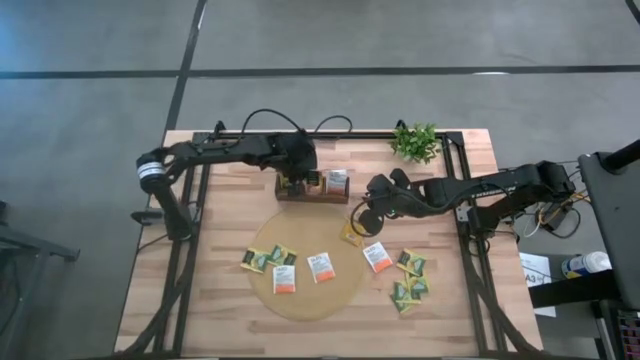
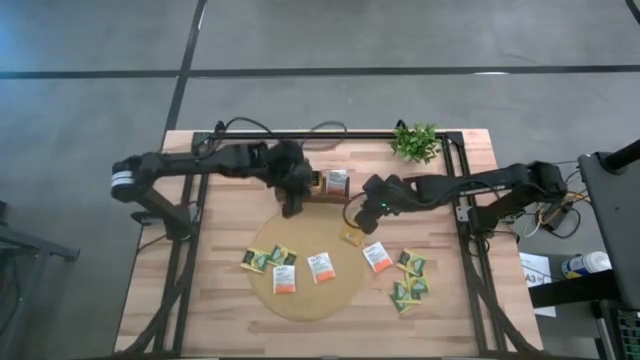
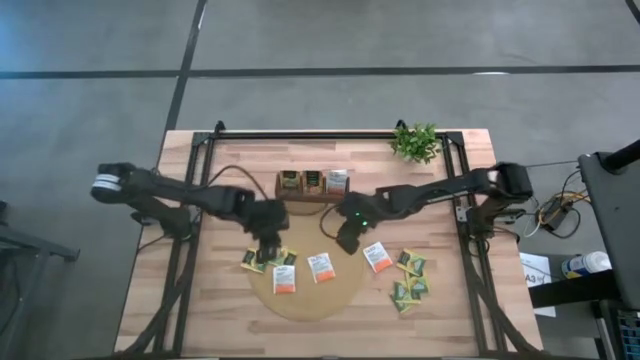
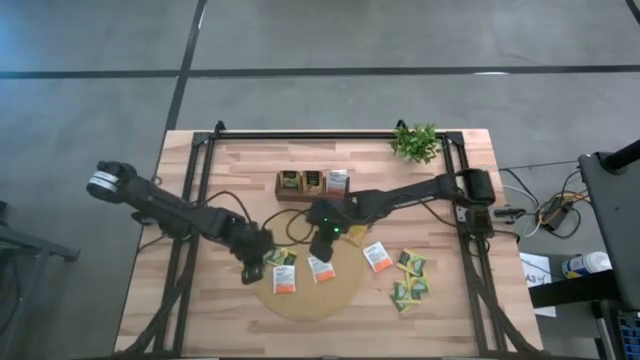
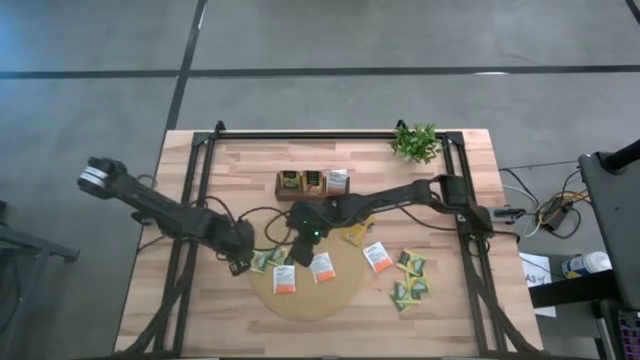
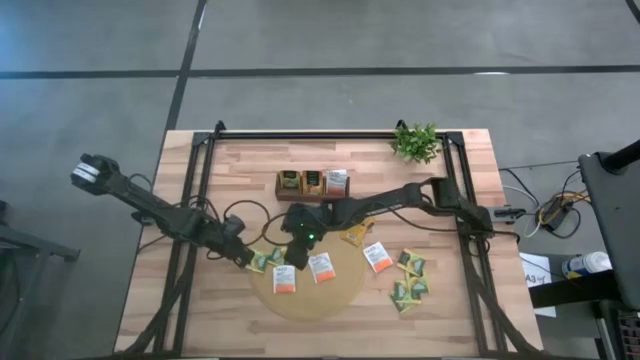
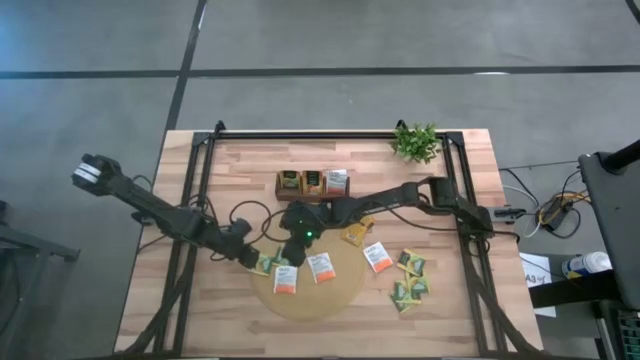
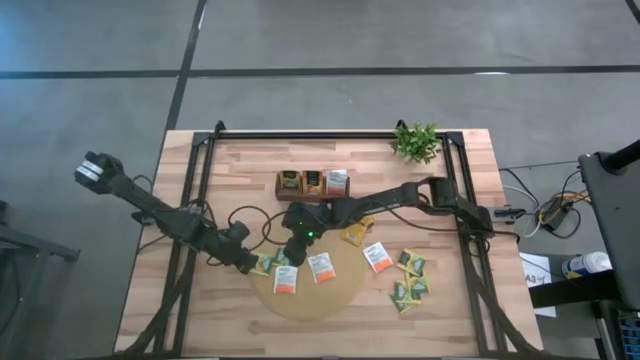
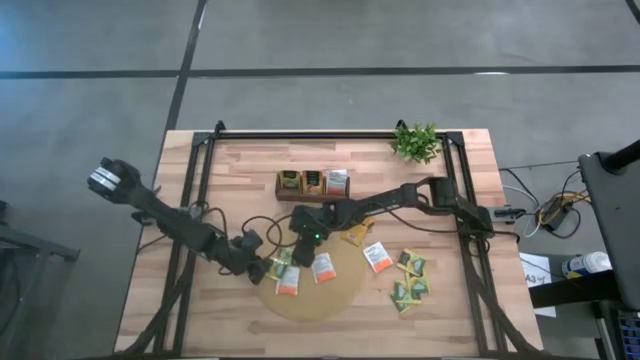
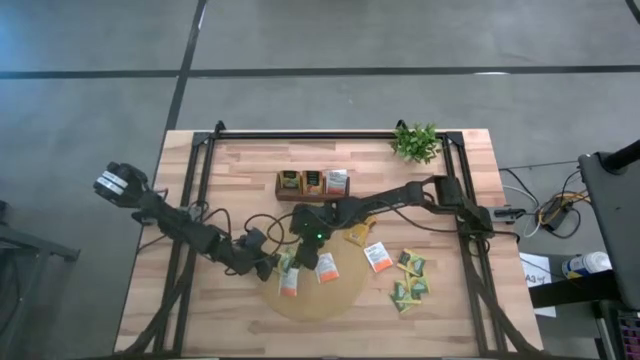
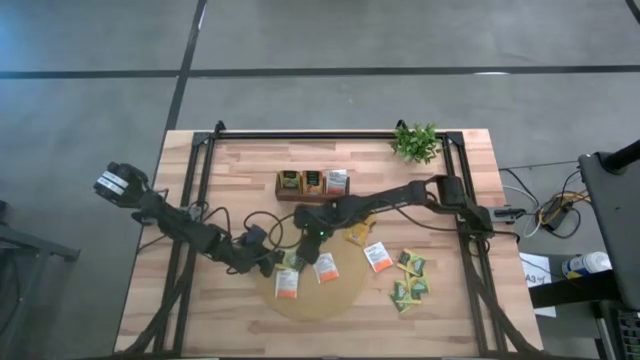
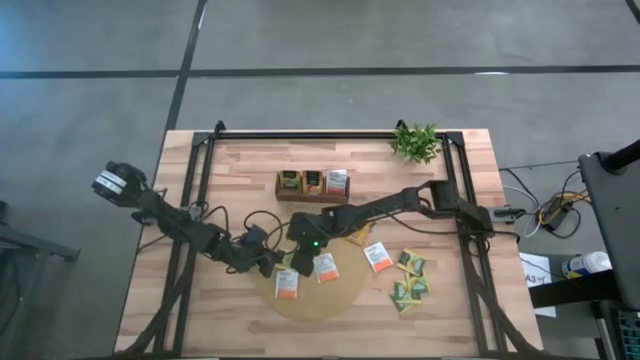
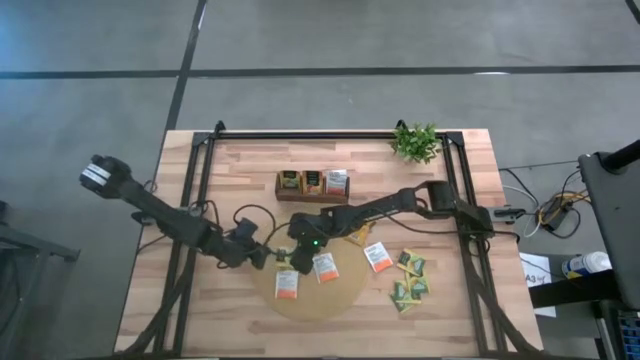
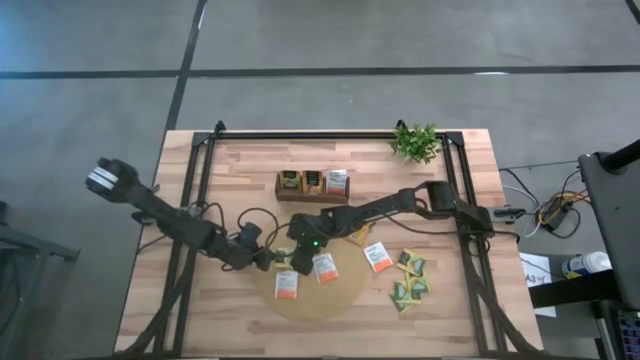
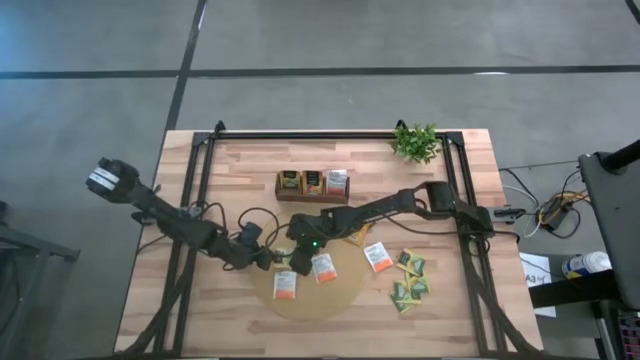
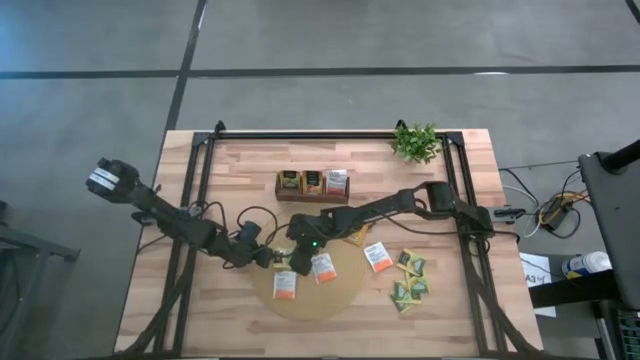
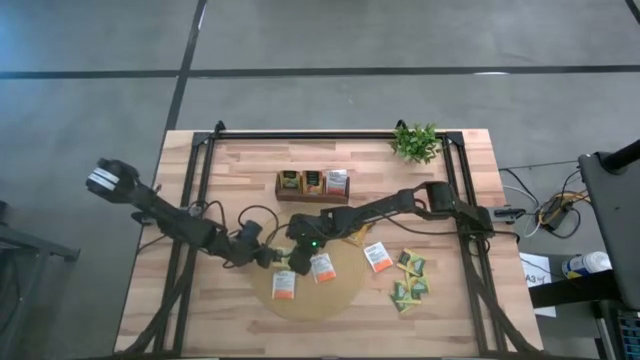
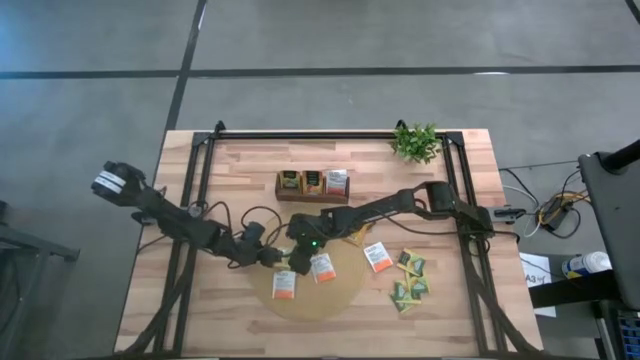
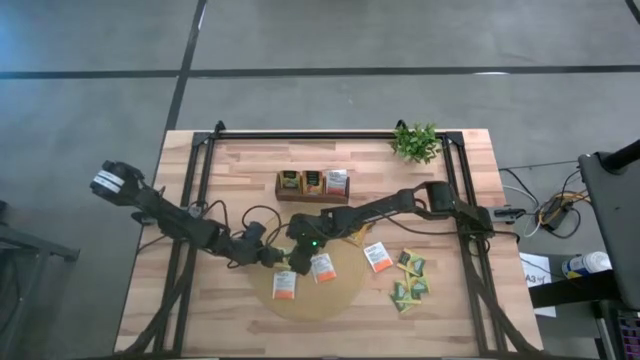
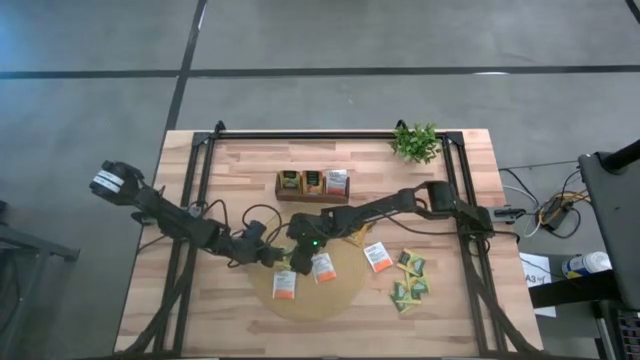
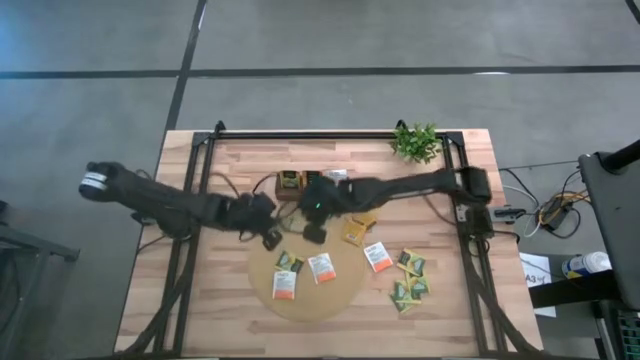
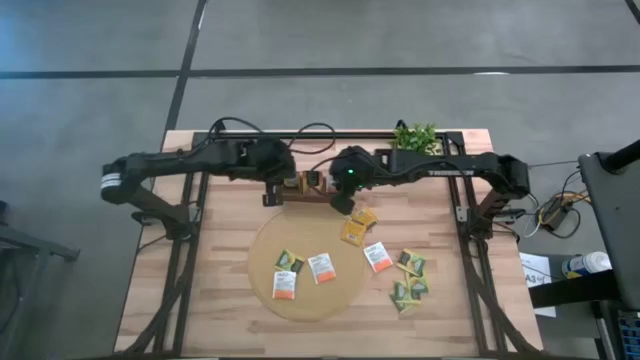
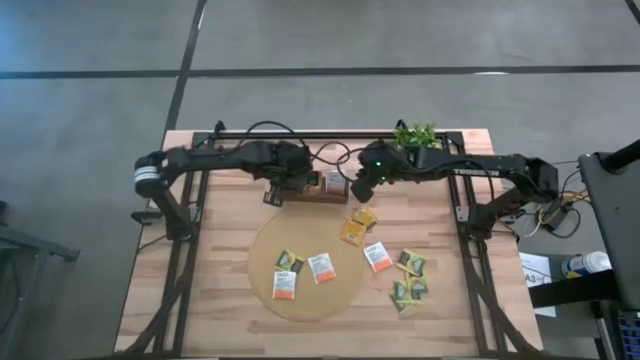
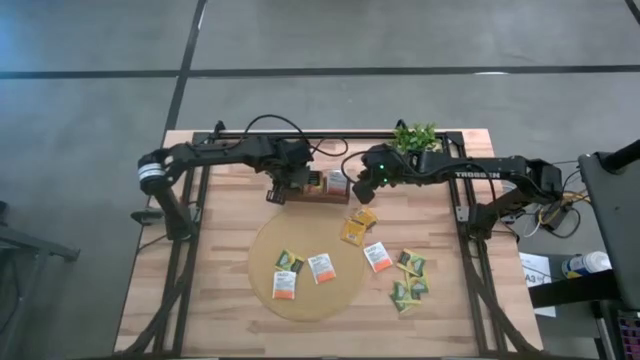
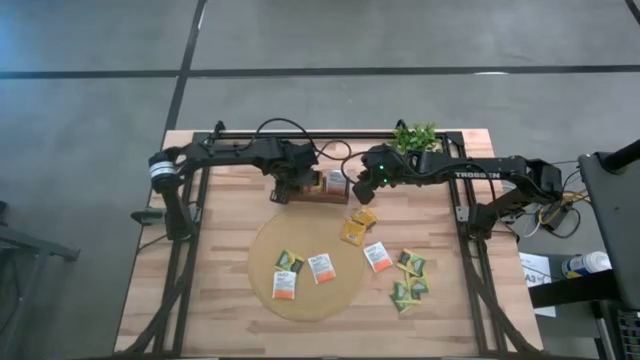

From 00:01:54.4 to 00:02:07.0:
Task: Pick & Place Tea
Put the green tea bag into the left section of the wooden organizer

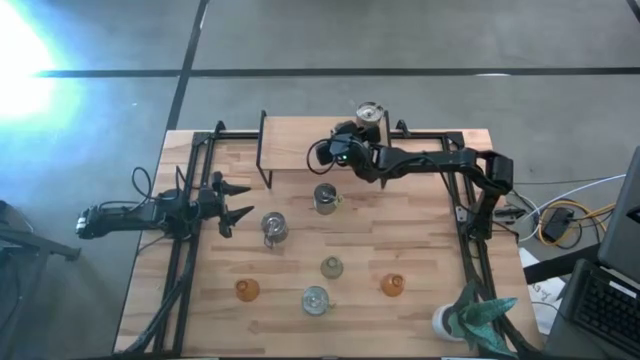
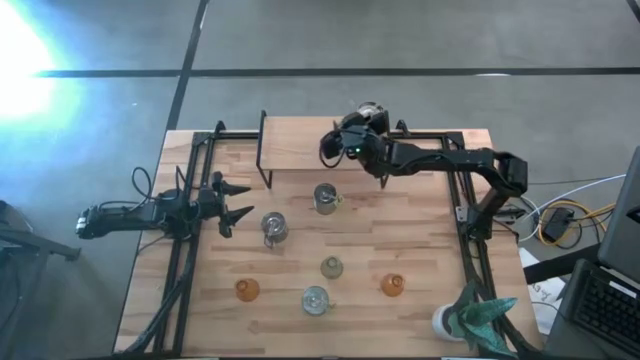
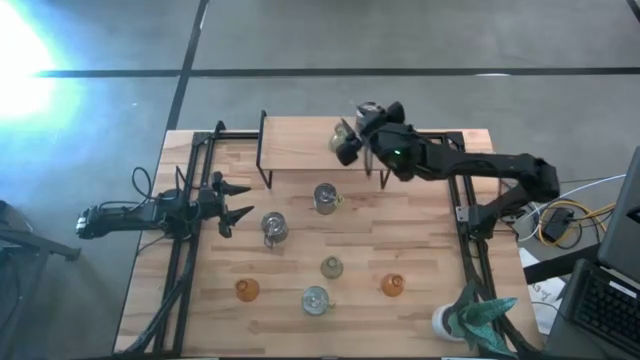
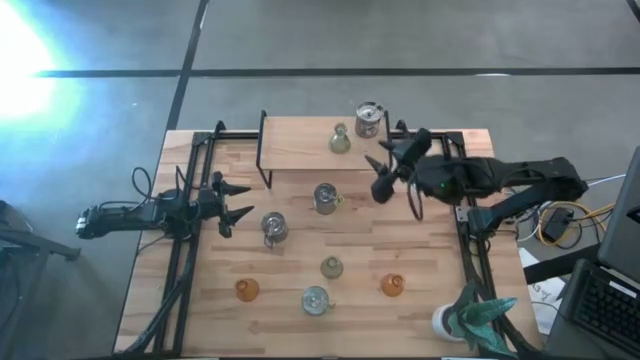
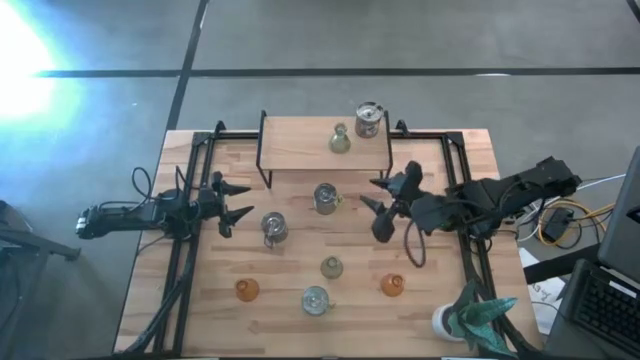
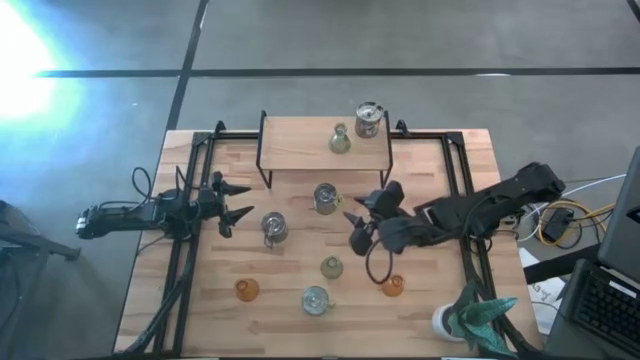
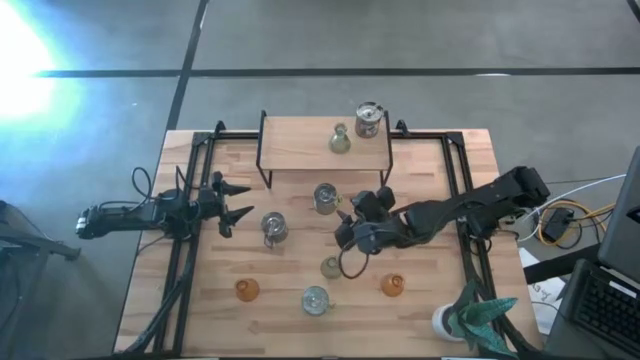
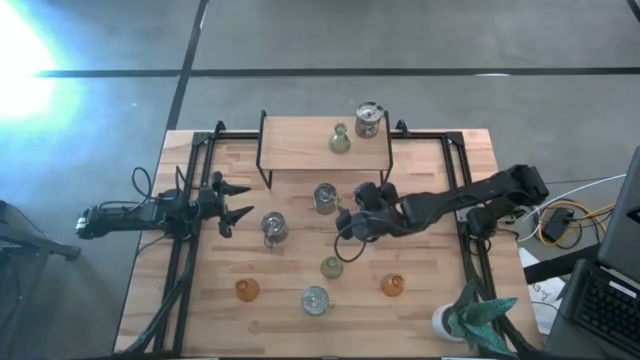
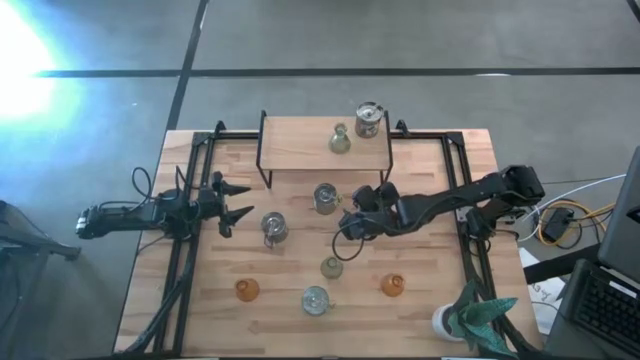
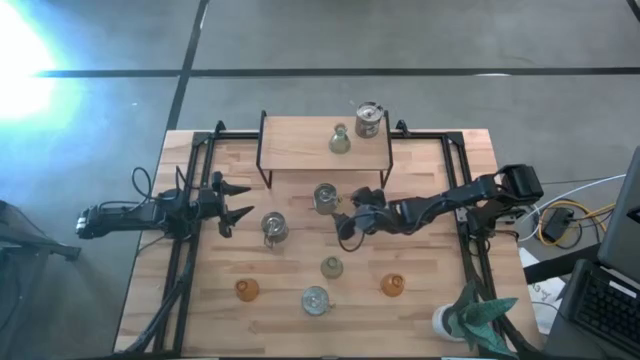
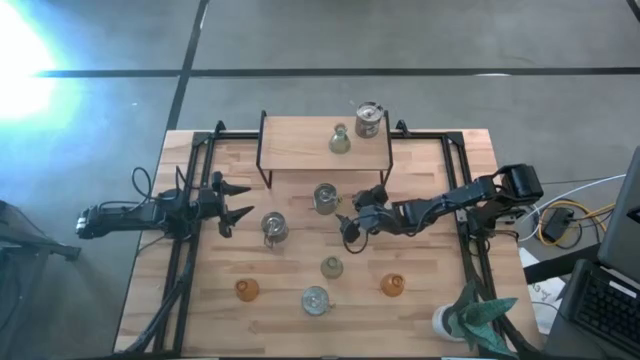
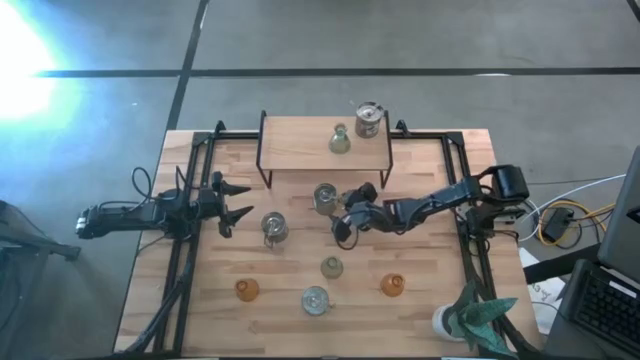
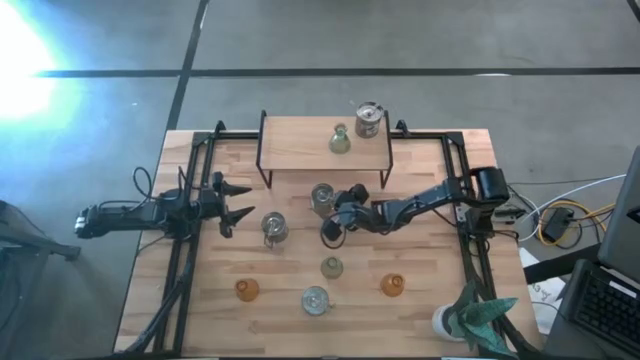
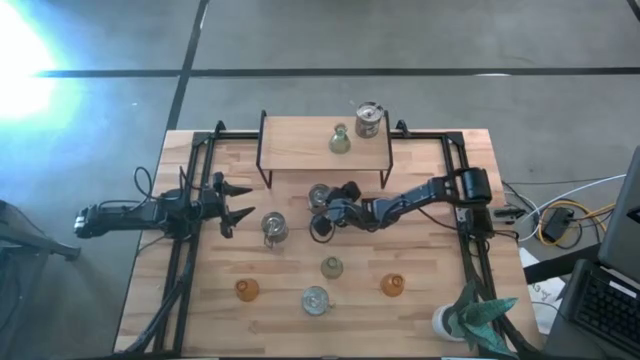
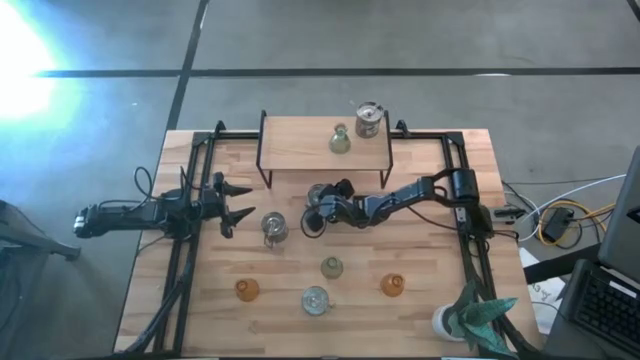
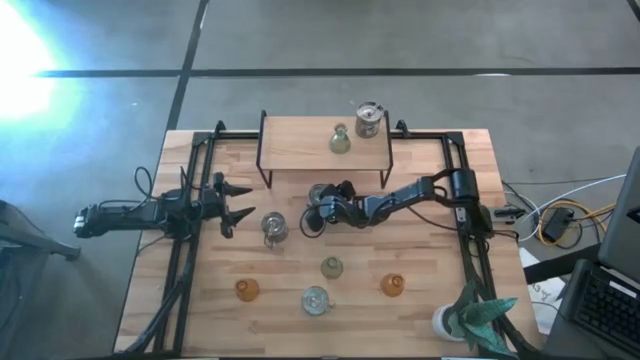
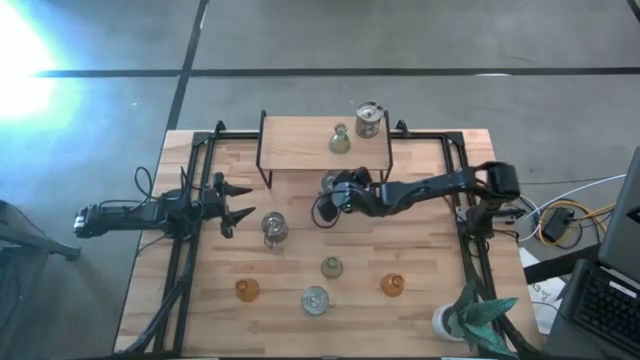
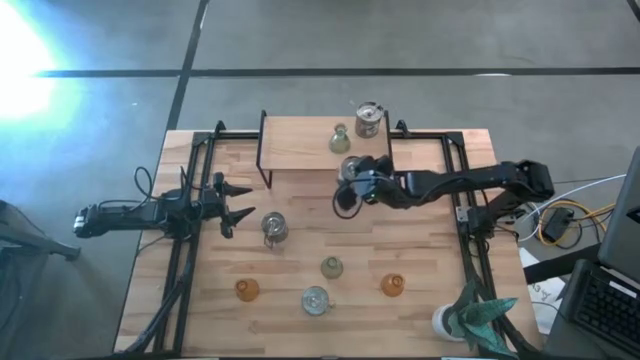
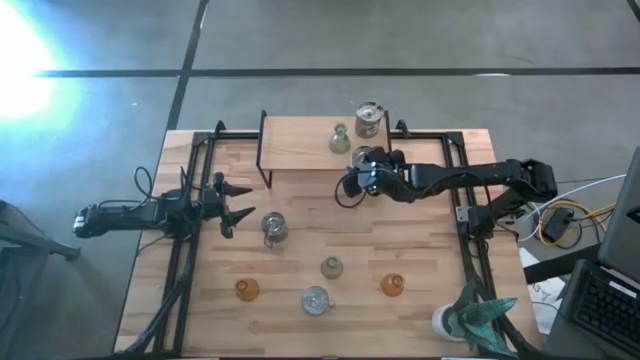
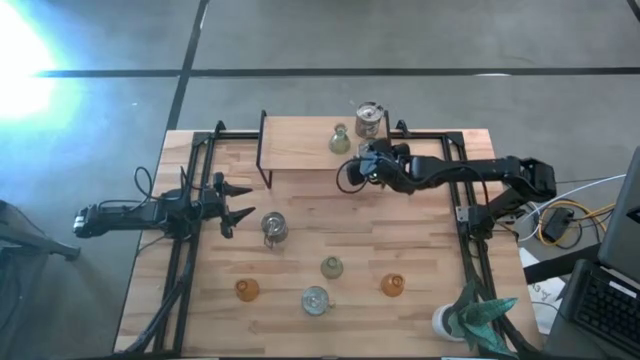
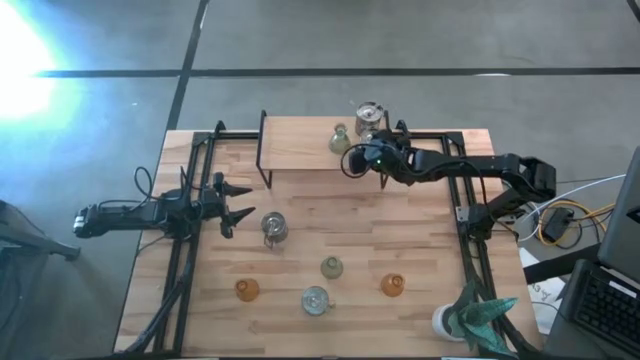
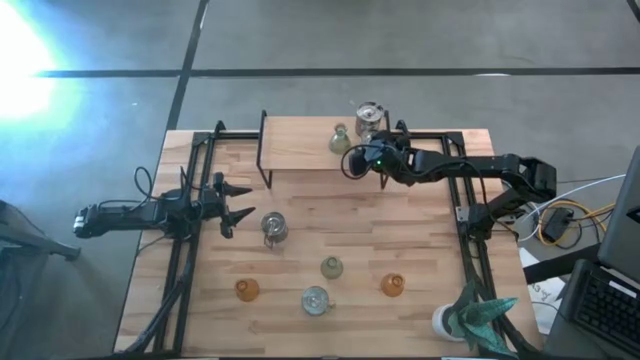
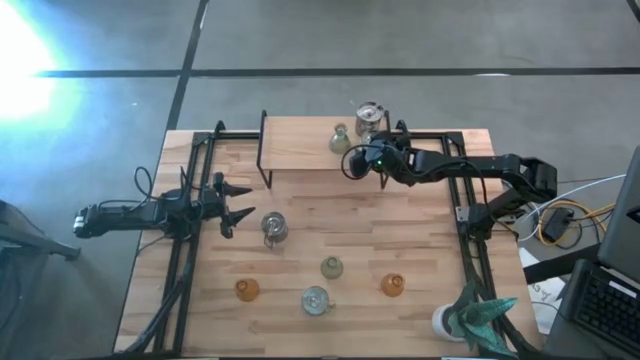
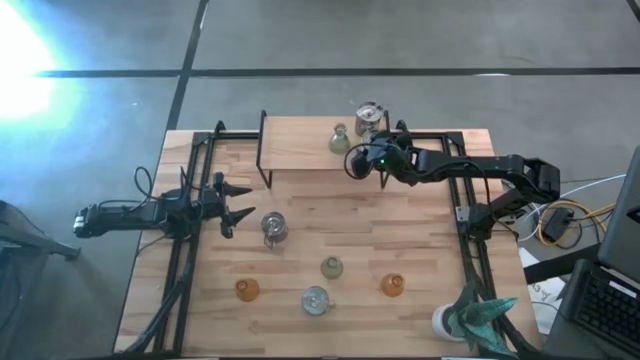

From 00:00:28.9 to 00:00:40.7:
Task: Pick & Place candle stick holders
Put the top green scented candle on the shelf aligned with the brown scented candle
